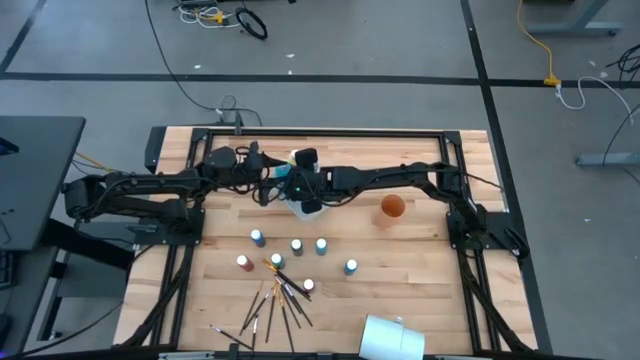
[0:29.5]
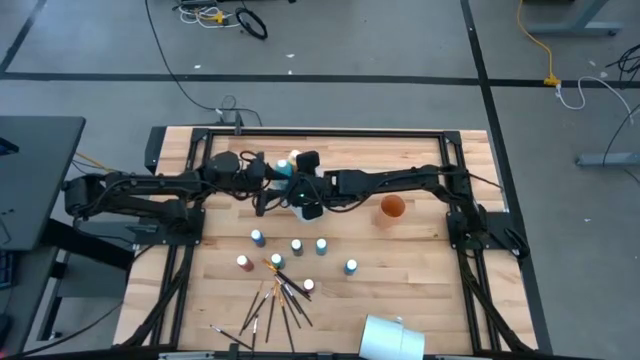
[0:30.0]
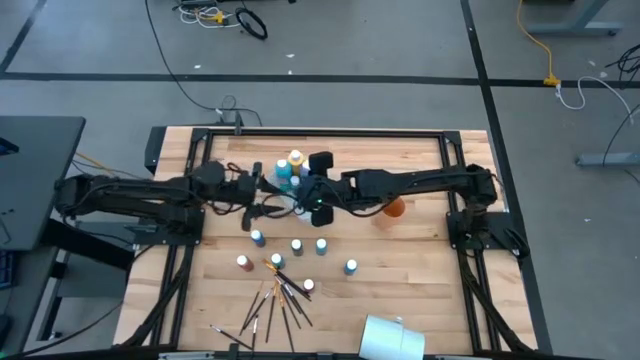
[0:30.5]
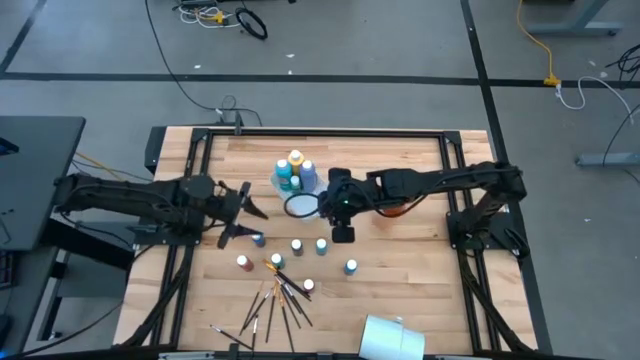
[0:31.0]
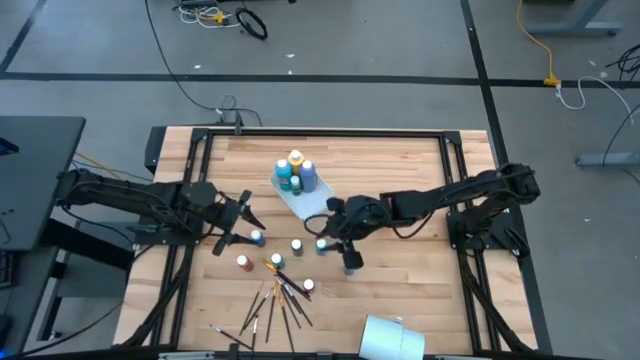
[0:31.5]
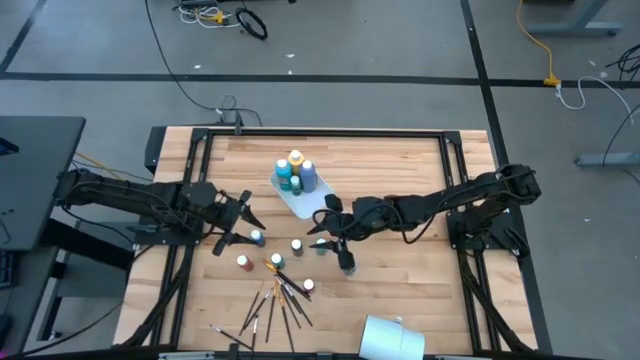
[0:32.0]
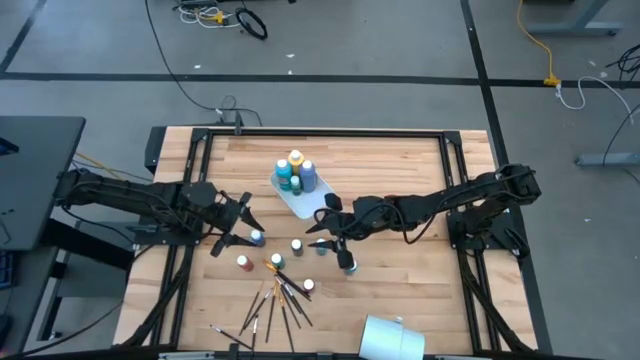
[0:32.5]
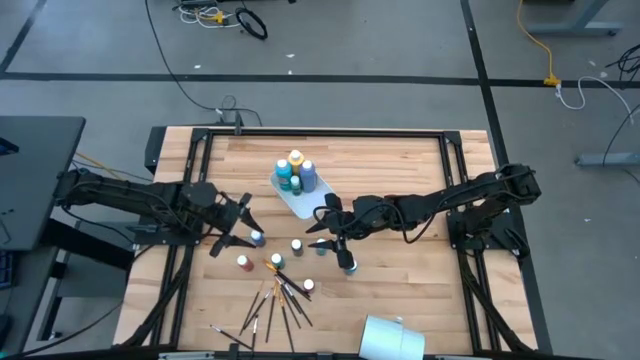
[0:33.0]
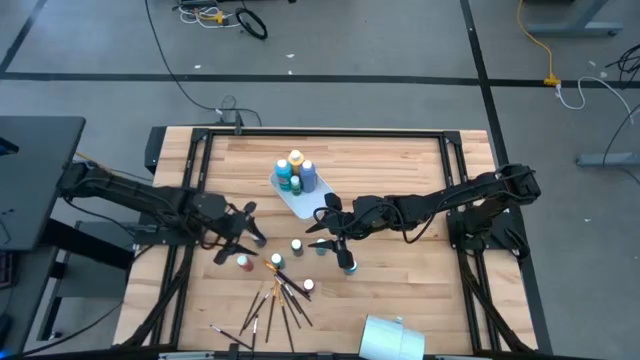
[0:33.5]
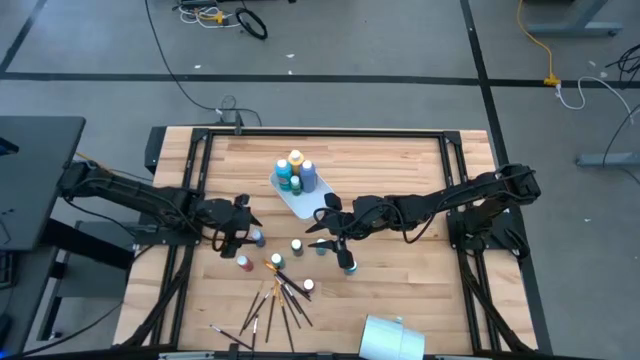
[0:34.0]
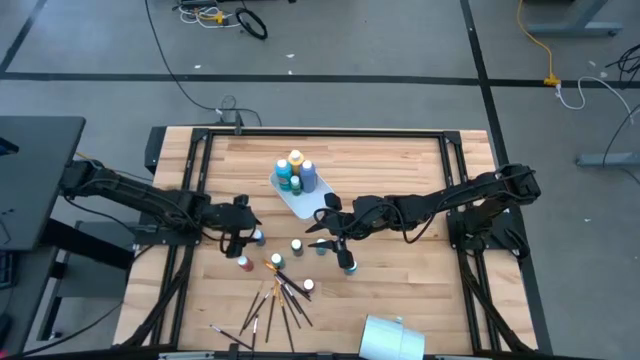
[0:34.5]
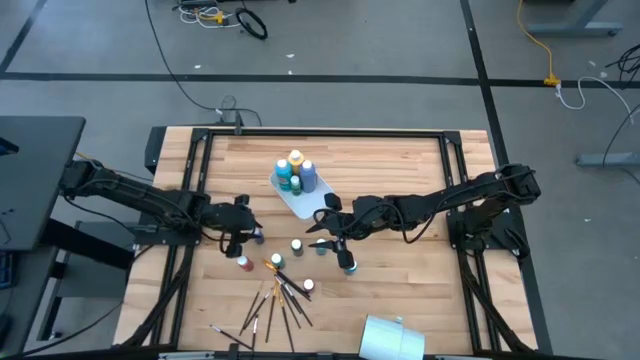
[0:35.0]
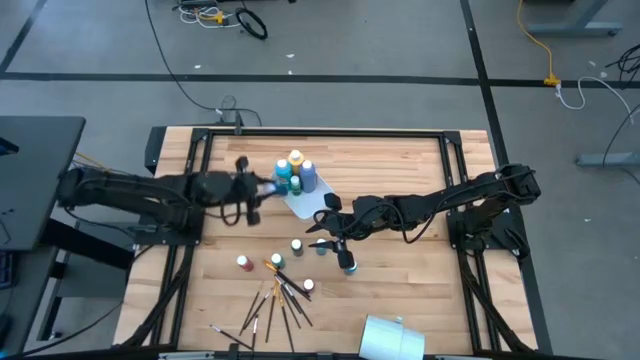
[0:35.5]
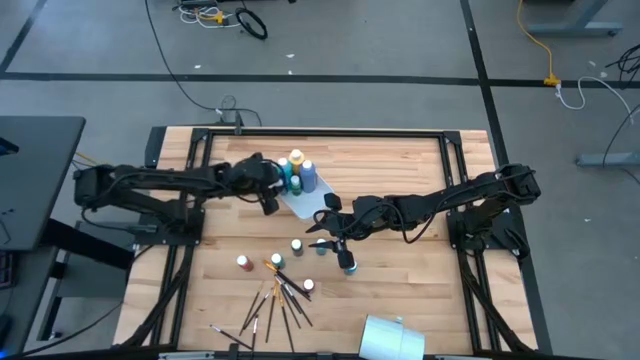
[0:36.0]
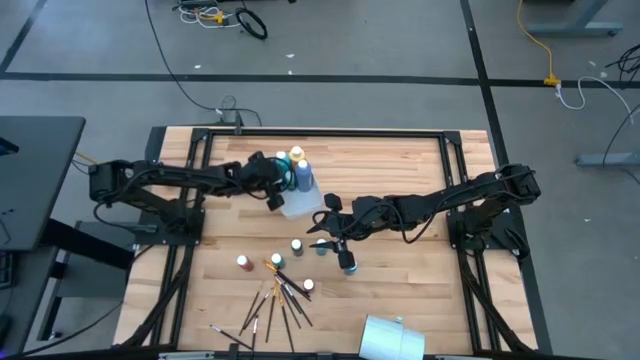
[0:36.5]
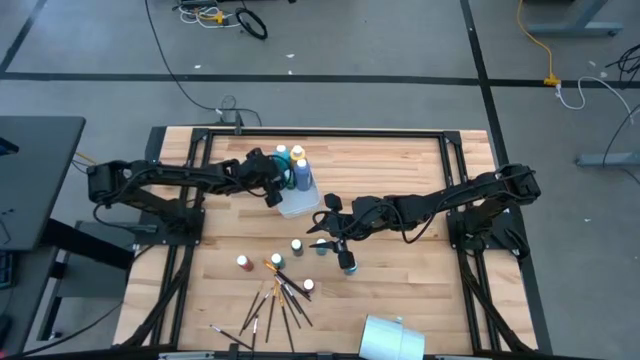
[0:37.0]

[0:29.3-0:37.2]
Task: Pick & Place Paint Supplies
Put the small blue paint bottle into the white bin

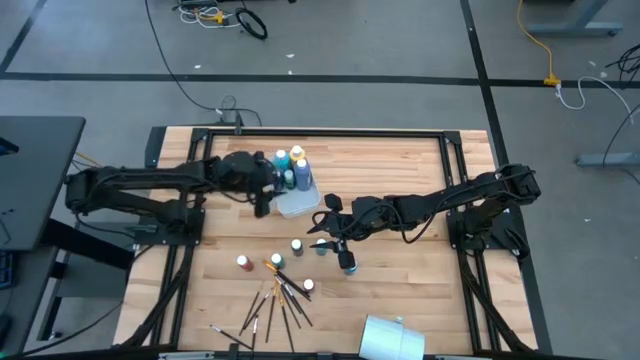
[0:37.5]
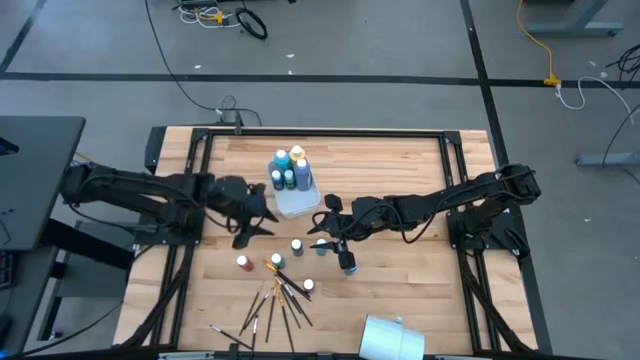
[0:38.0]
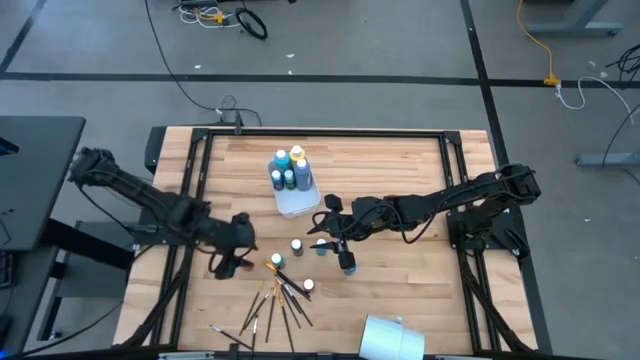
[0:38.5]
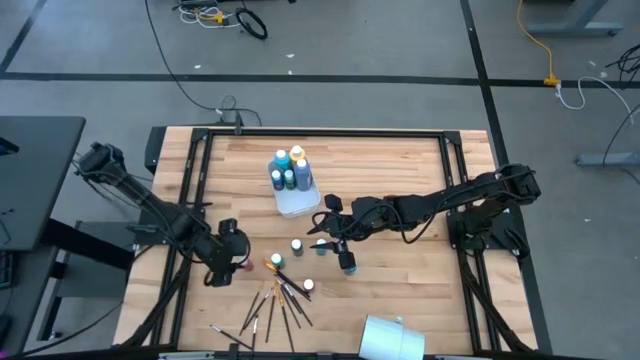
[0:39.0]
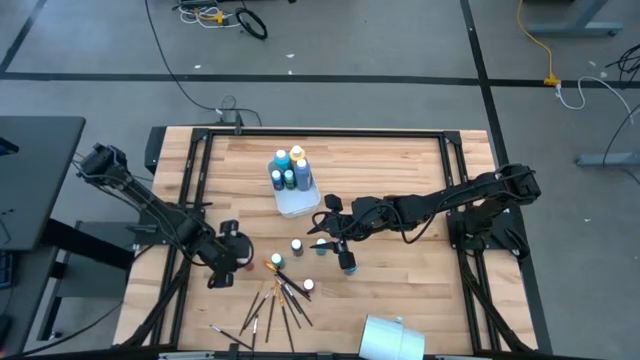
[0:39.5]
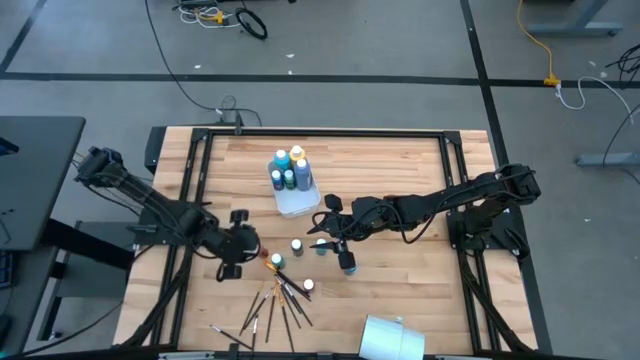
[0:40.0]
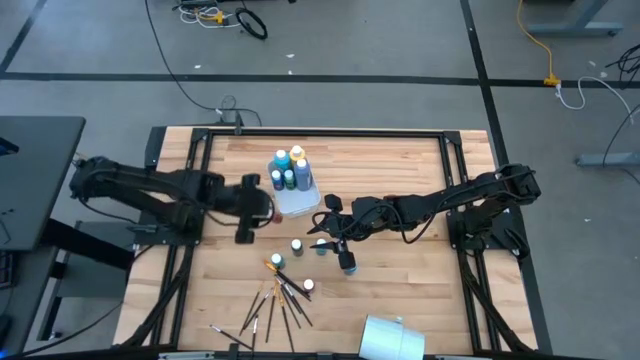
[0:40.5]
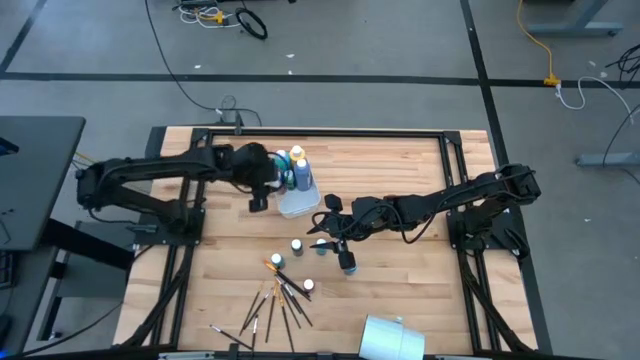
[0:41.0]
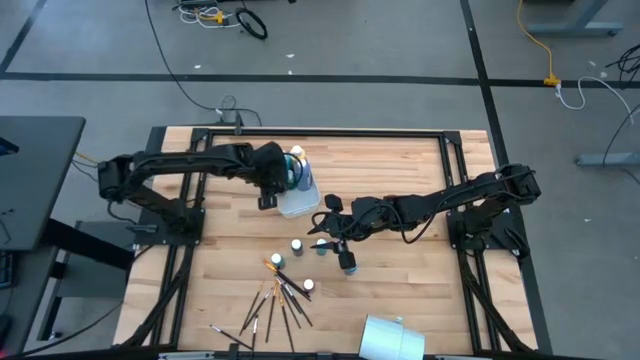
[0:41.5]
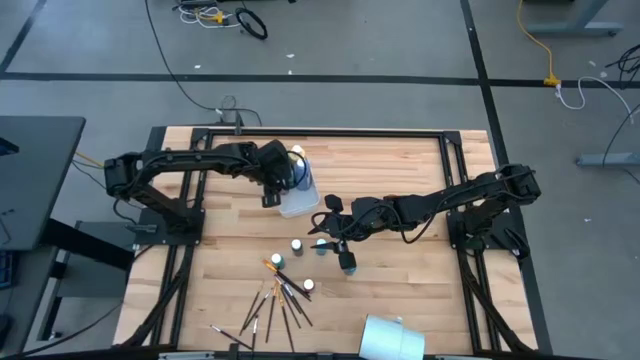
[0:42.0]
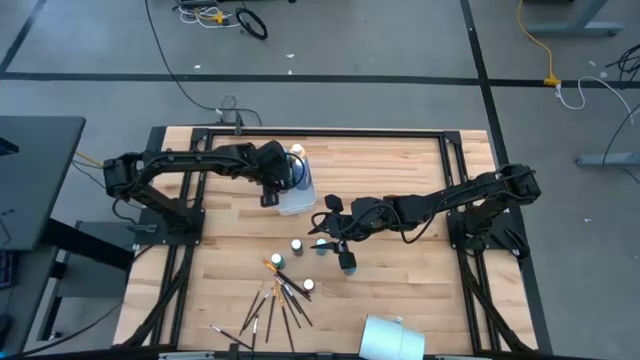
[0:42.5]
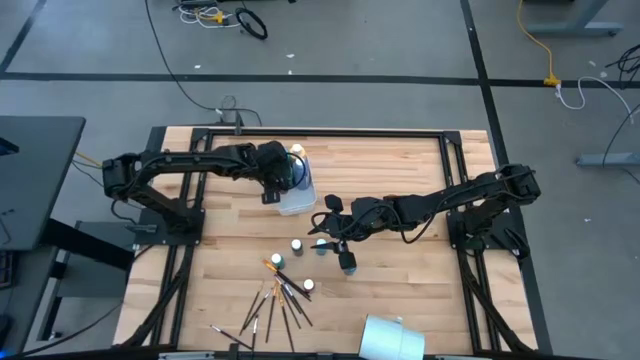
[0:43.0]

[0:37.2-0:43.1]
Put the red paint bottle into the white bin

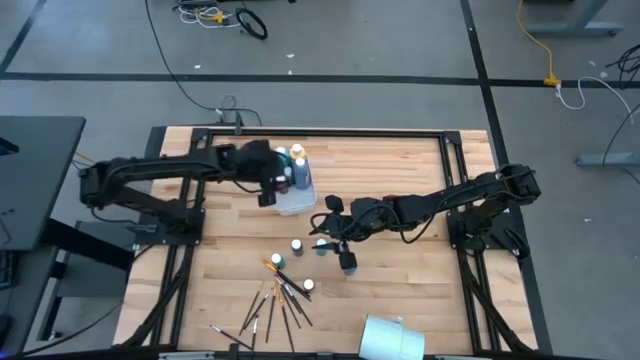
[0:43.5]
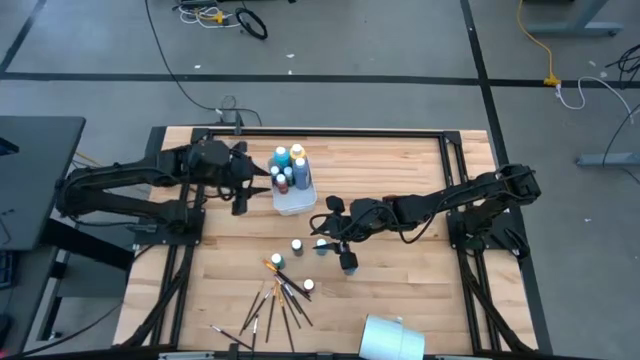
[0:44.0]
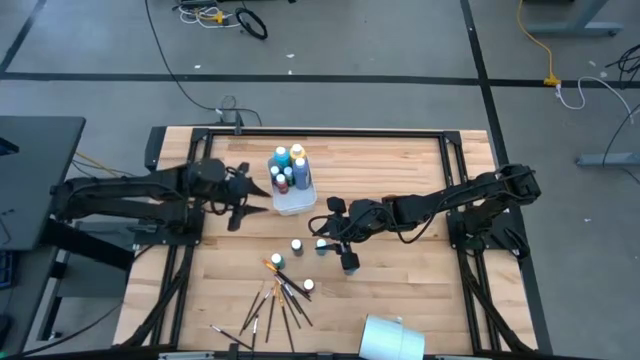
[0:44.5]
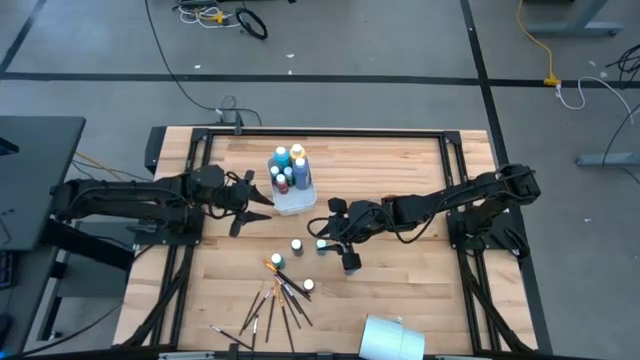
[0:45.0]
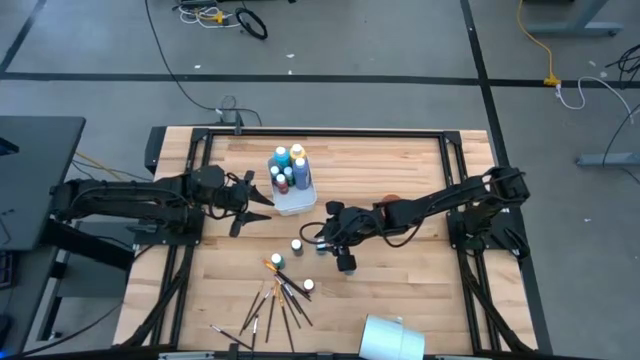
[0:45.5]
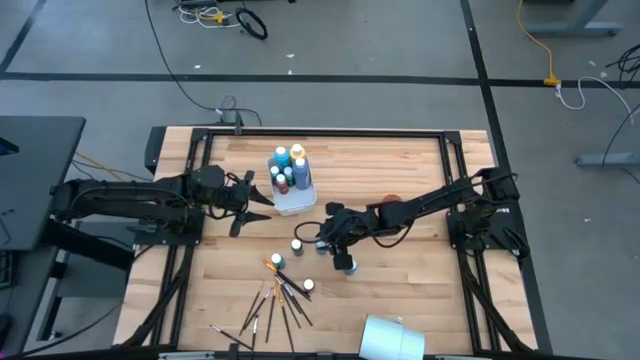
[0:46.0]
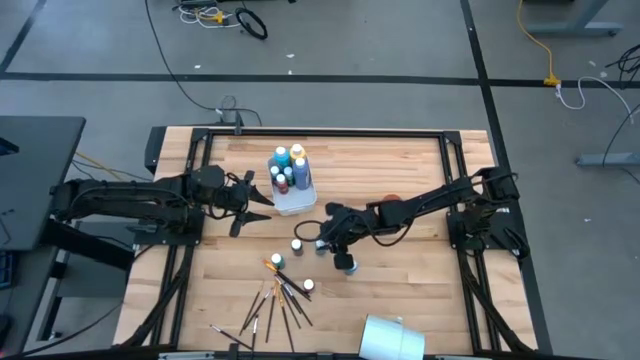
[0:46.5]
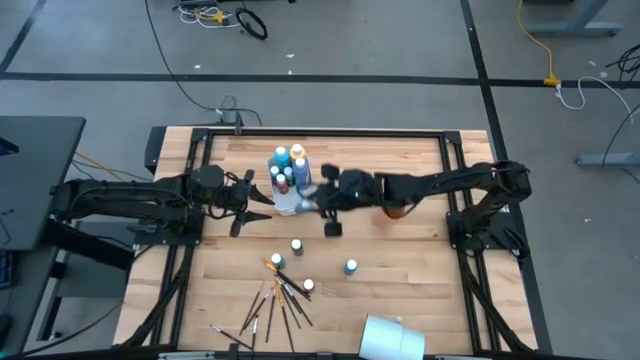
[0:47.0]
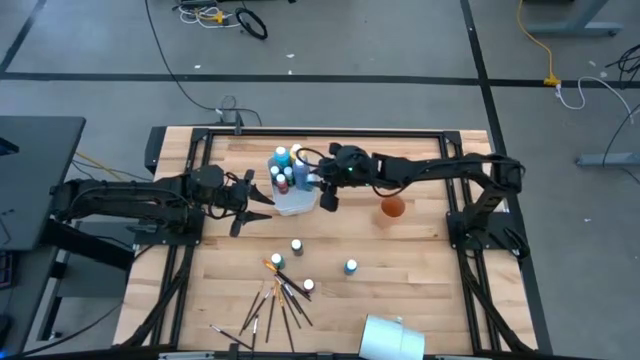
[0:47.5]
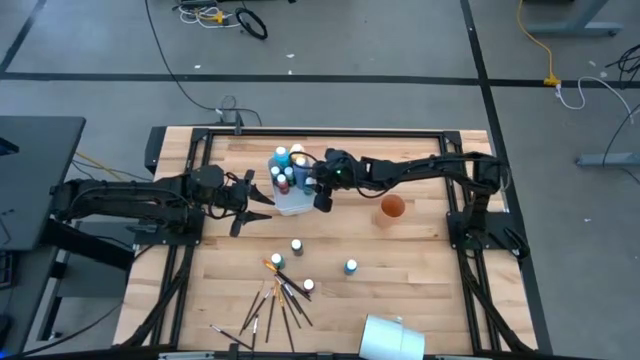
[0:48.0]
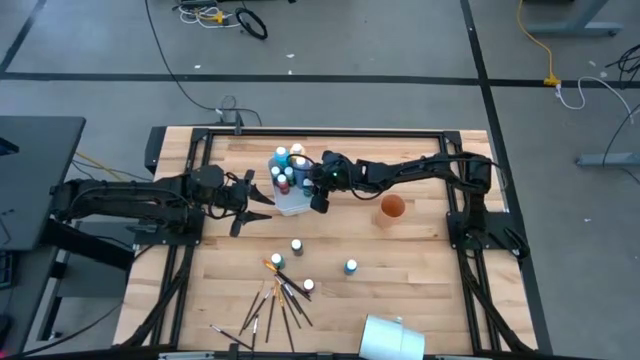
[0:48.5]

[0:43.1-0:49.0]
Put the small light blue paint bottle into the white bin

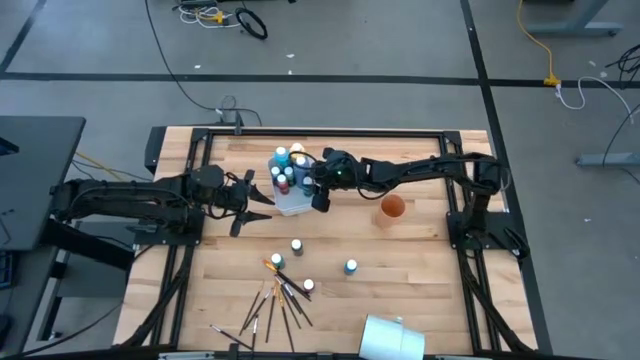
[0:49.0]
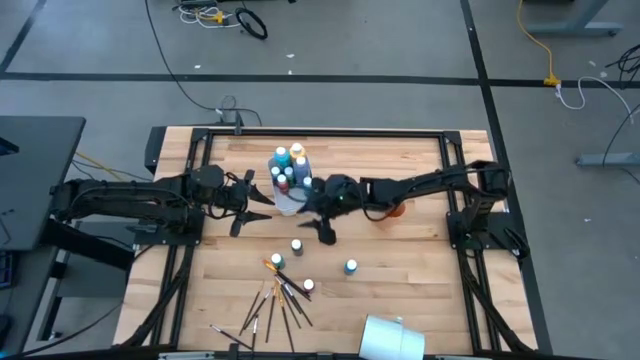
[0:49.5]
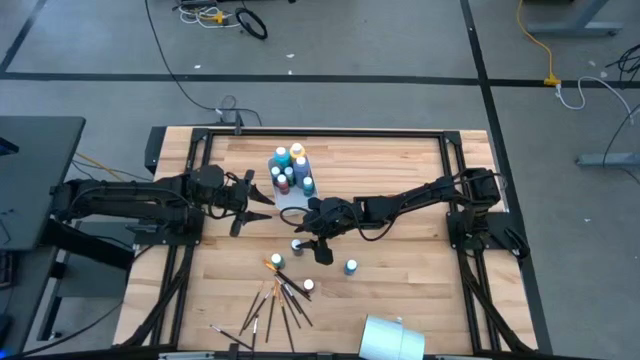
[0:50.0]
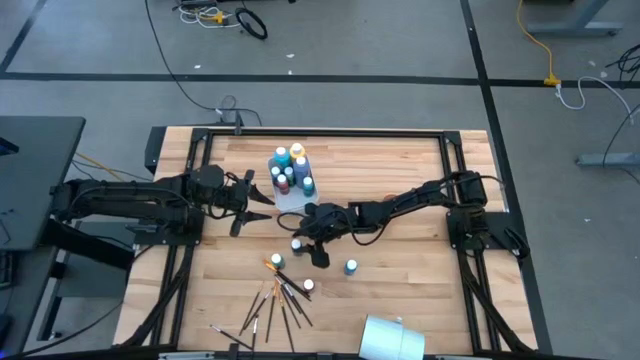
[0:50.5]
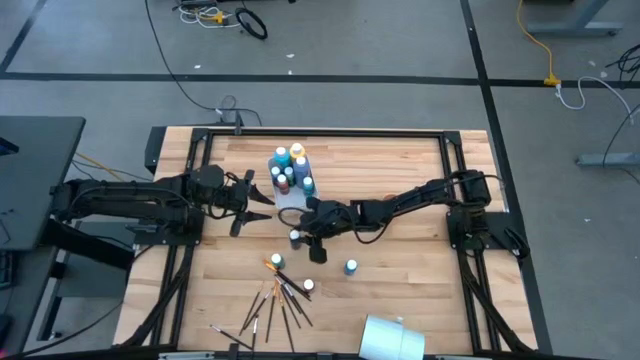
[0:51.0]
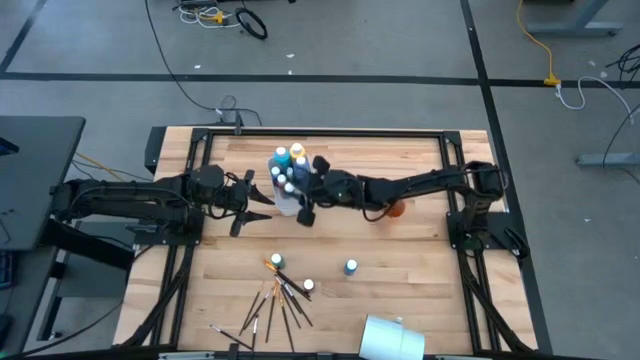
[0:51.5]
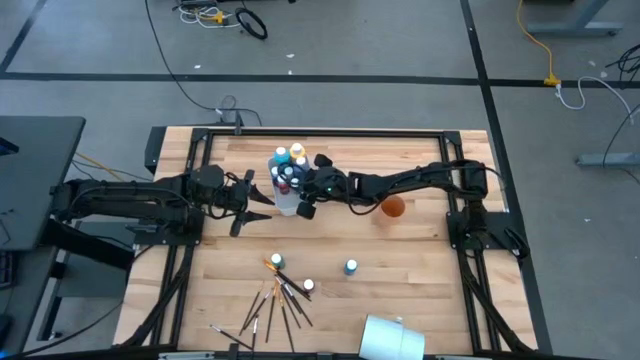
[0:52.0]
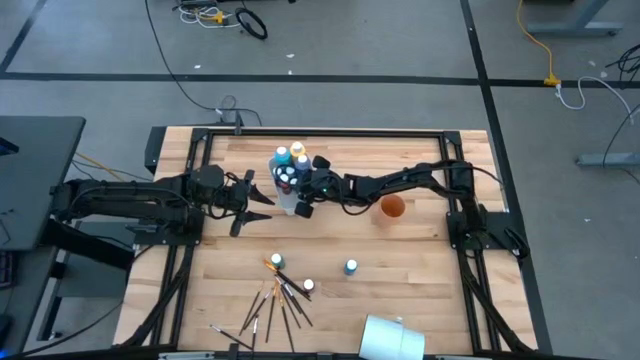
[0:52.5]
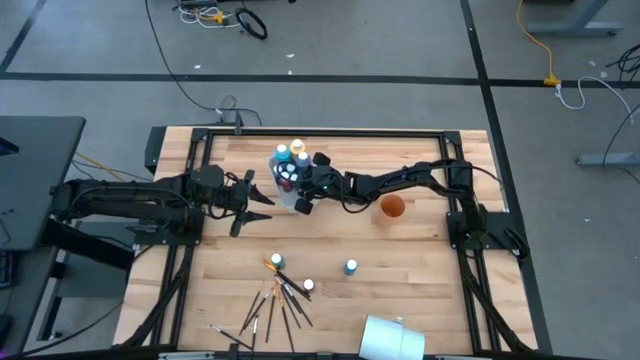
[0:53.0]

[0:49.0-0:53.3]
Put the black paint bottle into the white bin
